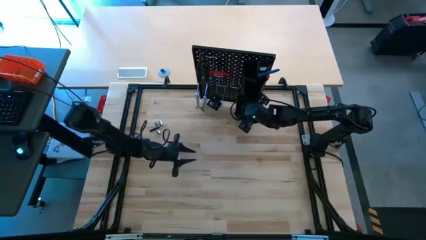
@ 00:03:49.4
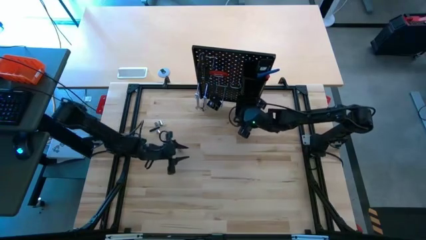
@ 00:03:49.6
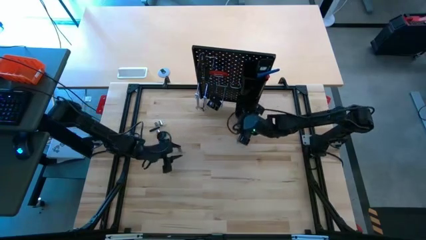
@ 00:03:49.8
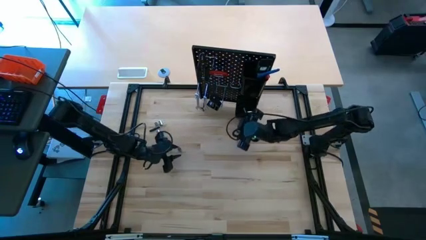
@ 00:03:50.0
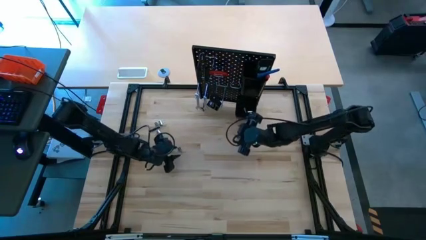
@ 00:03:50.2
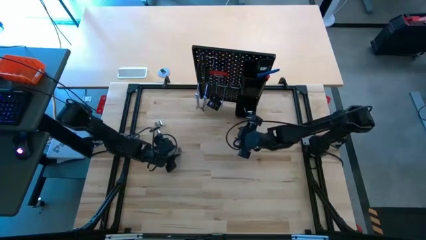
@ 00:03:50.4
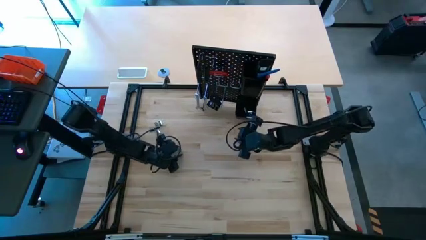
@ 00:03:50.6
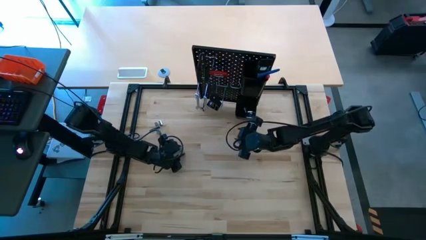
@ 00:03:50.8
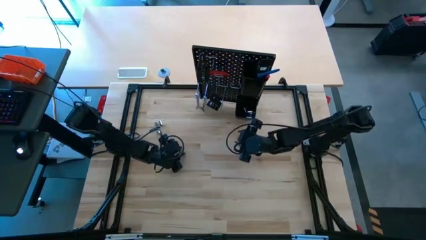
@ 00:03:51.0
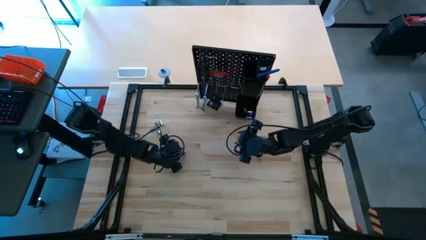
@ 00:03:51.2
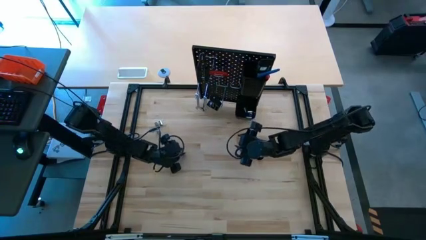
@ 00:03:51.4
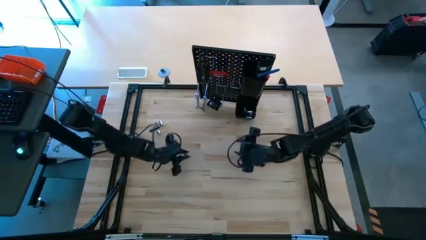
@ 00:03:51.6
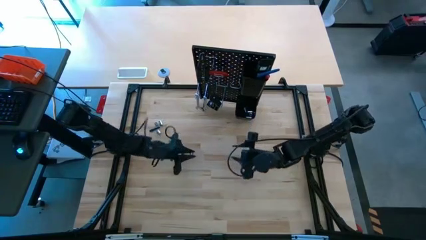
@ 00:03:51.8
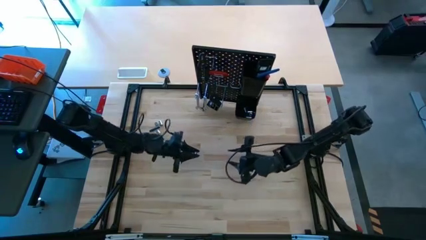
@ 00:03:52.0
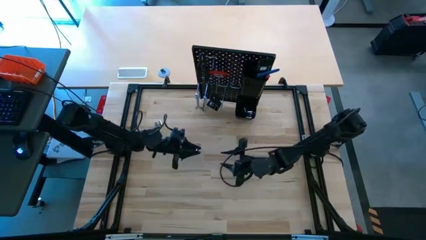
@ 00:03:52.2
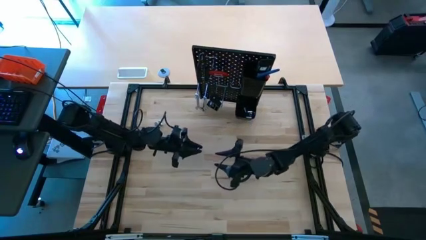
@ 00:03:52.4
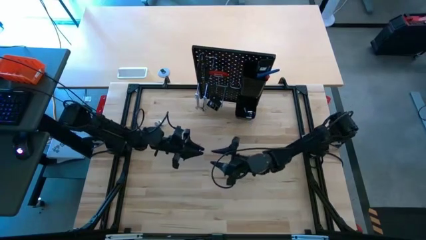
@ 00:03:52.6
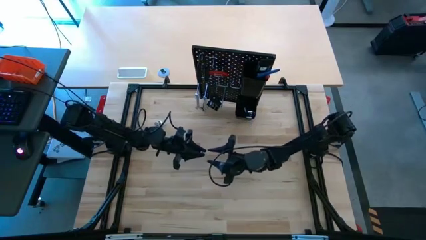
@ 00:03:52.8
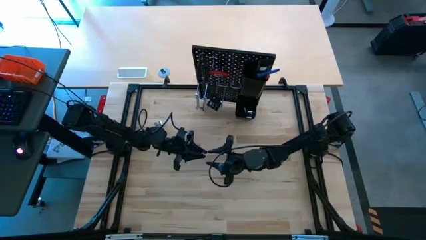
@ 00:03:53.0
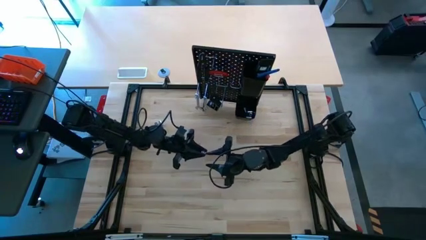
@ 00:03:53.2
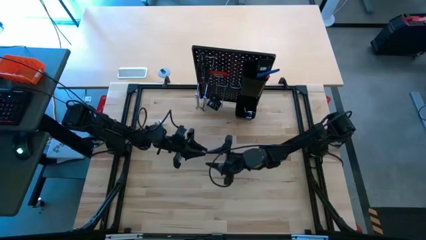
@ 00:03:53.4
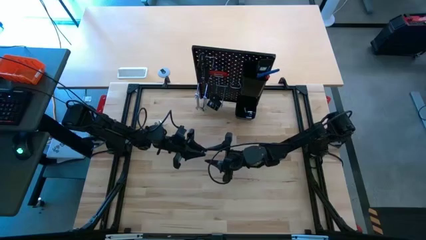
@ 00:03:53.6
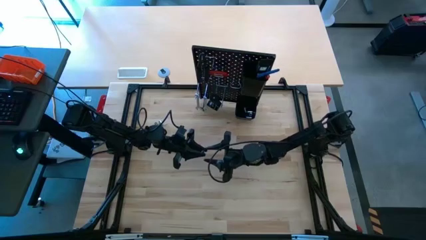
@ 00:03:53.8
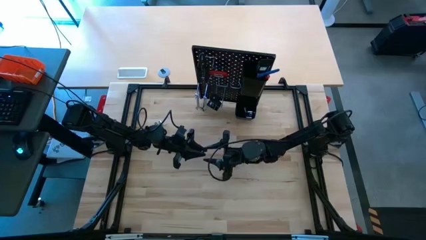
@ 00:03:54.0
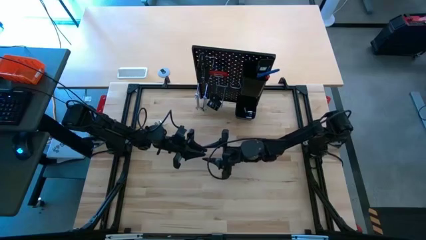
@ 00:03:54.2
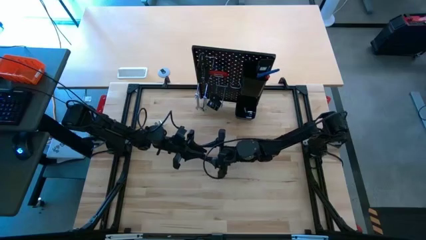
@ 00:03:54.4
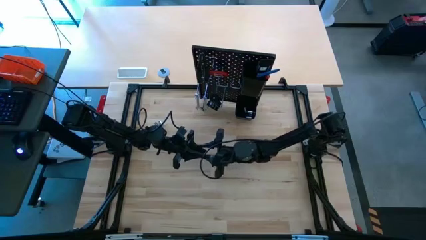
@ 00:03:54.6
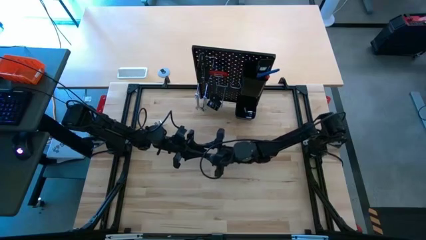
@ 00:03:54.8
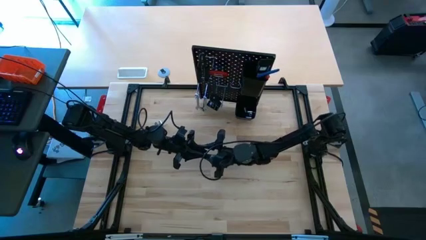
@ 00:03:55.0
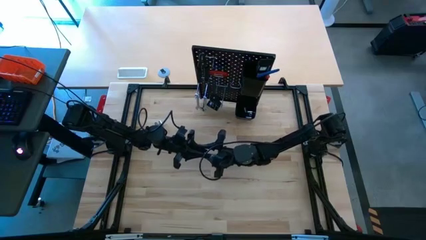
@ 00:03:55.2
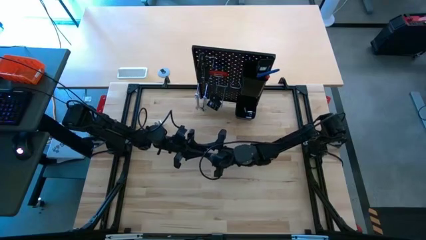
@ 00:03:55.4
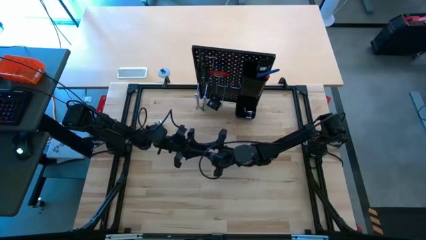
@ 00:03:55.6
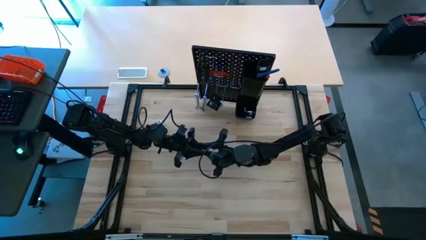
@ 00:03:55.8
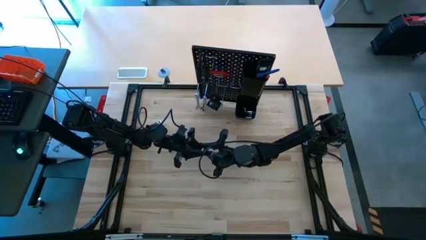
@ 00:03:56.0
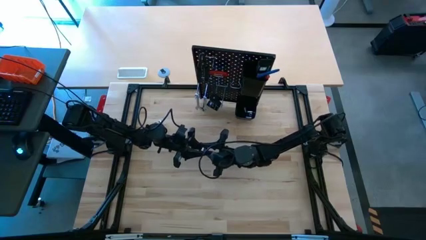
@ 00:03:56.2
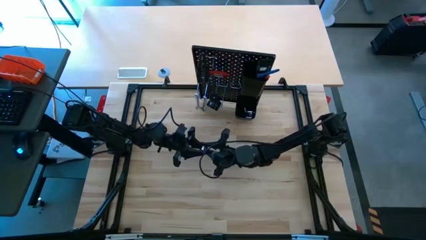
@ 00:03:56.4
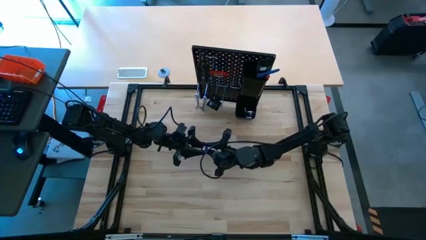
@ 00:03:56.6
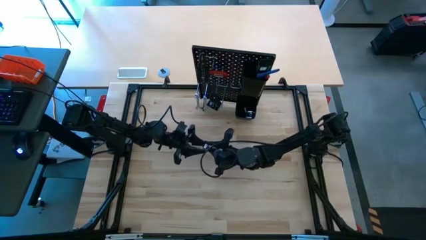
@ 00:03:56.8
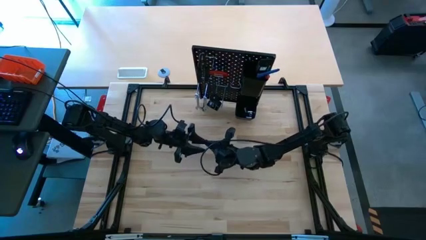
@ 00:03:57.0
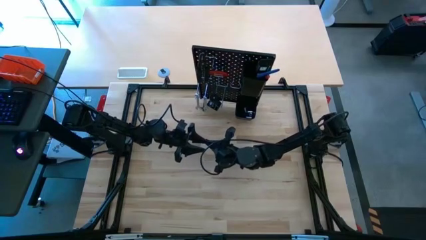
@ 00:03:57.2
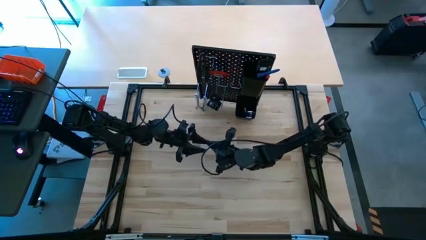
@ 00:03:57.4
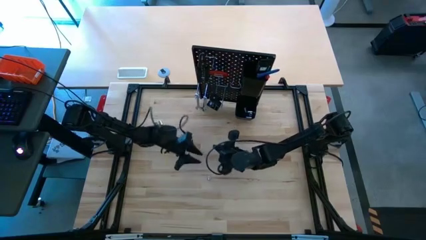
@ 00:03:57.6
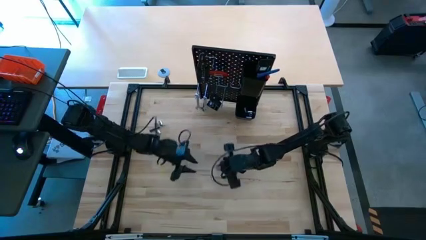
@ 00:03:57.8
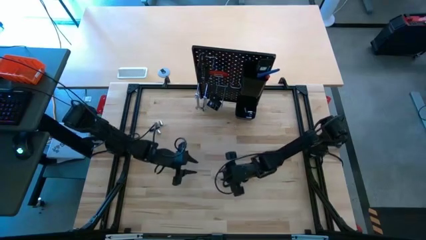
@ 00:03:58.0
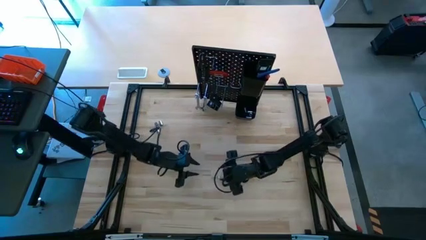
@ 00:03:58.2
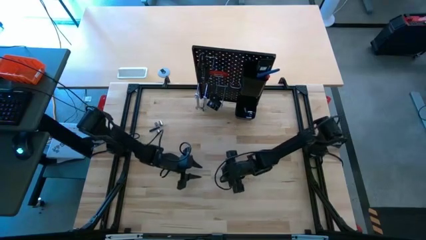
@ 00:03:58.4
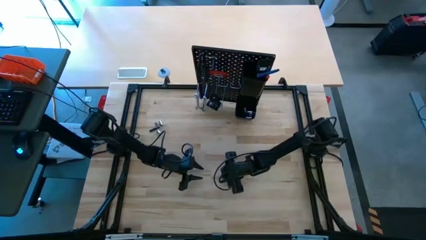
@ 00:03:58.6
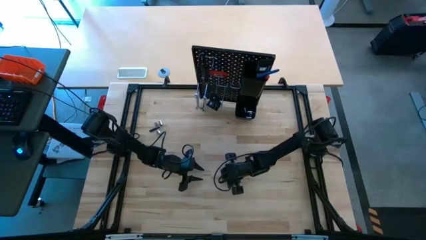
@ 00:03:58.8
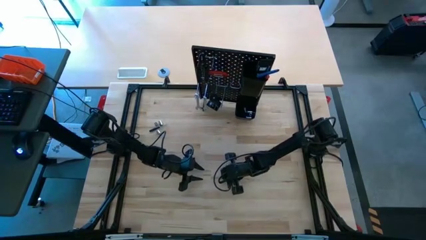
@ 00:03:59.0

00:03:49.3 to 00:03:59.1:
Task: Hang tools onto peg board
Put the socket into the bottom black bin on the peg board

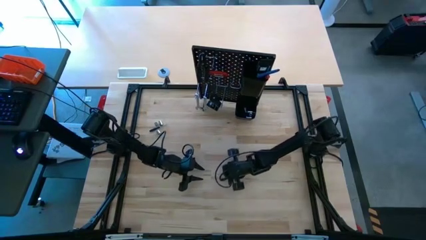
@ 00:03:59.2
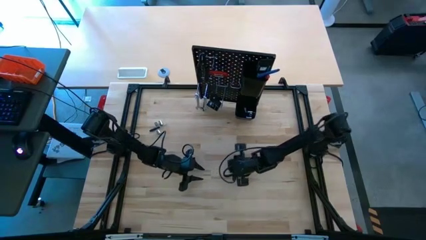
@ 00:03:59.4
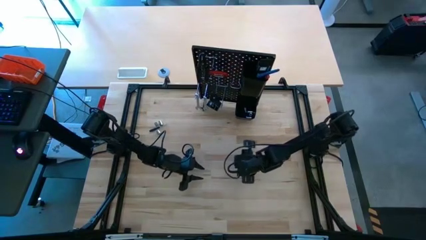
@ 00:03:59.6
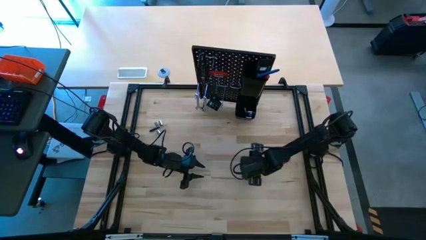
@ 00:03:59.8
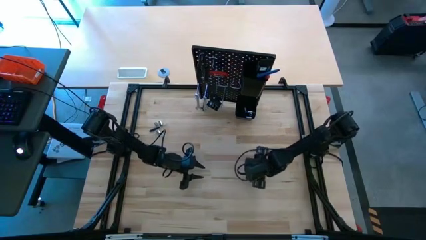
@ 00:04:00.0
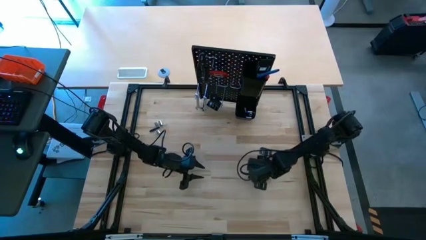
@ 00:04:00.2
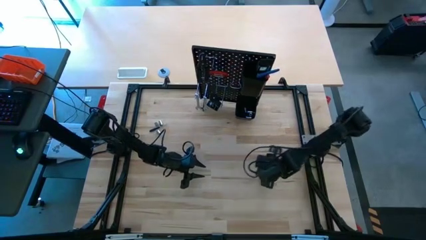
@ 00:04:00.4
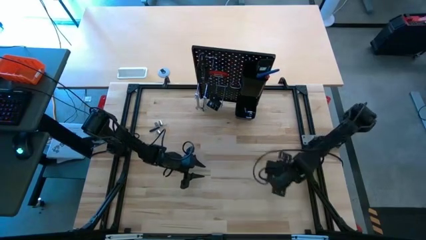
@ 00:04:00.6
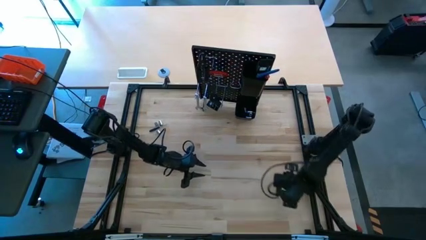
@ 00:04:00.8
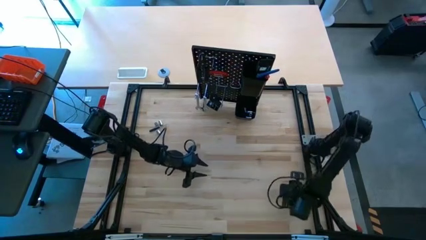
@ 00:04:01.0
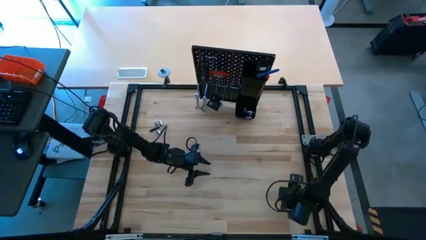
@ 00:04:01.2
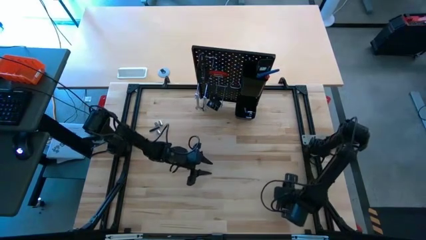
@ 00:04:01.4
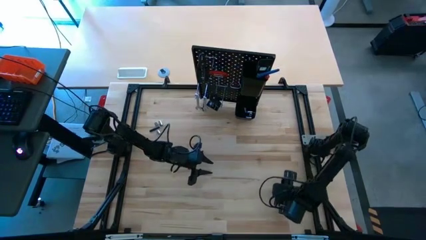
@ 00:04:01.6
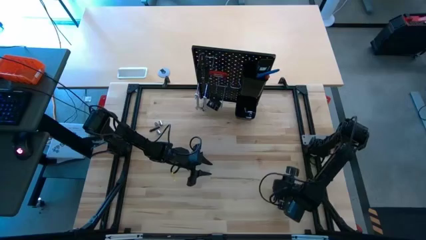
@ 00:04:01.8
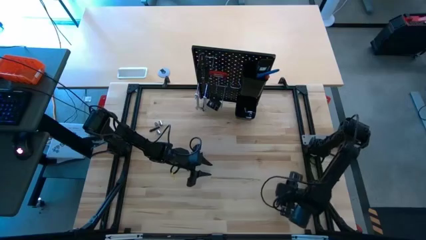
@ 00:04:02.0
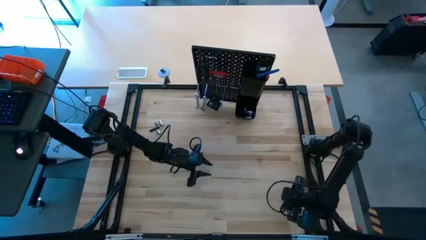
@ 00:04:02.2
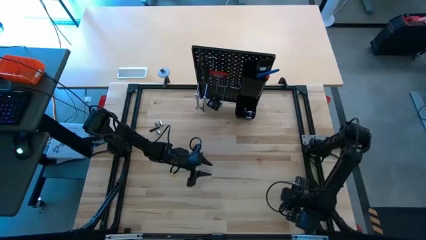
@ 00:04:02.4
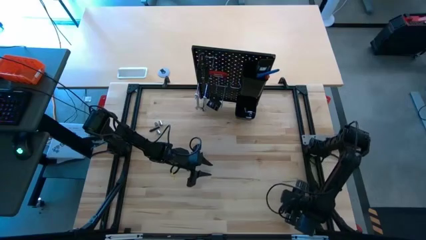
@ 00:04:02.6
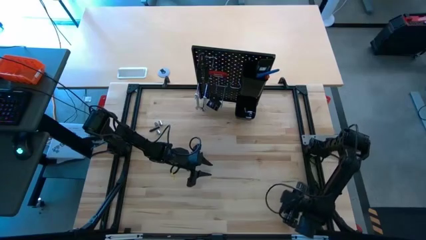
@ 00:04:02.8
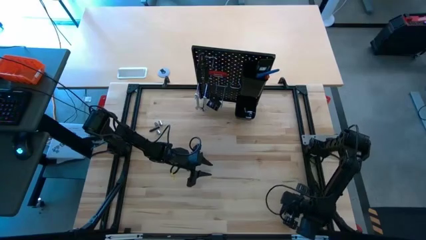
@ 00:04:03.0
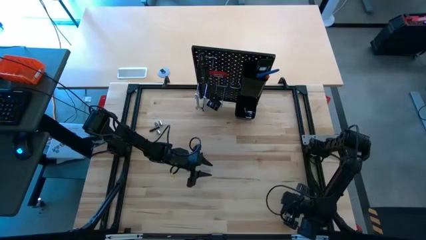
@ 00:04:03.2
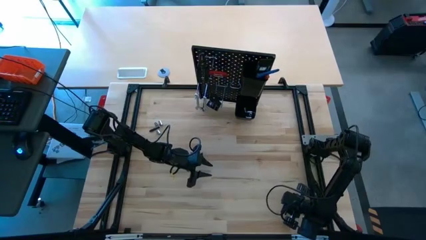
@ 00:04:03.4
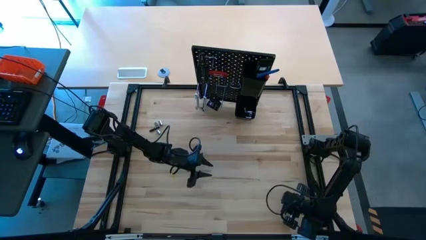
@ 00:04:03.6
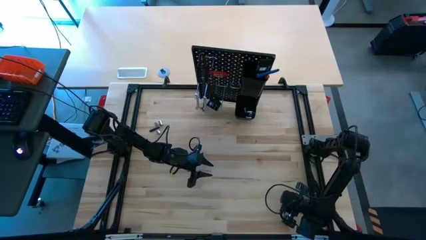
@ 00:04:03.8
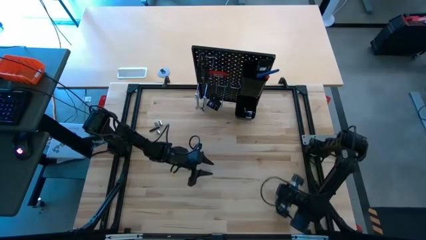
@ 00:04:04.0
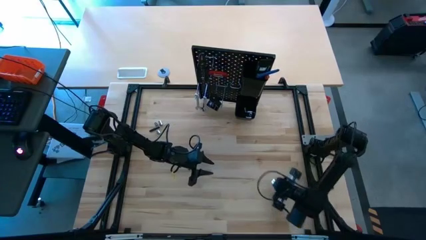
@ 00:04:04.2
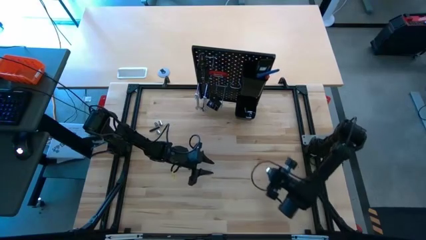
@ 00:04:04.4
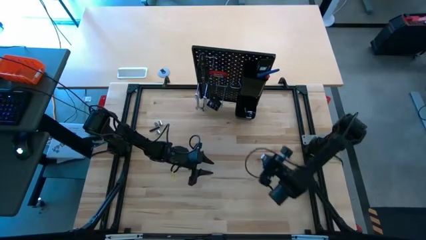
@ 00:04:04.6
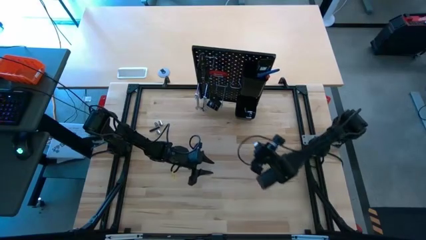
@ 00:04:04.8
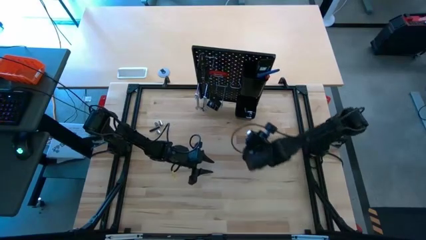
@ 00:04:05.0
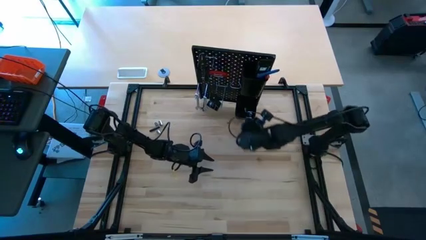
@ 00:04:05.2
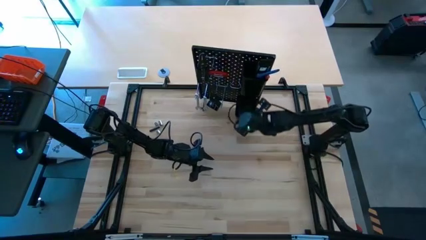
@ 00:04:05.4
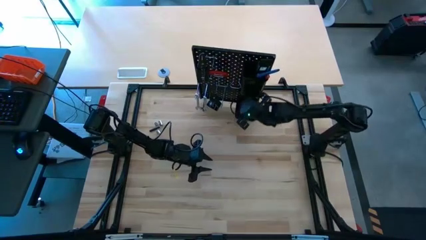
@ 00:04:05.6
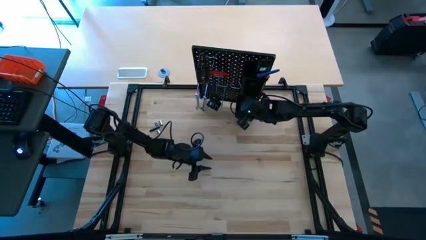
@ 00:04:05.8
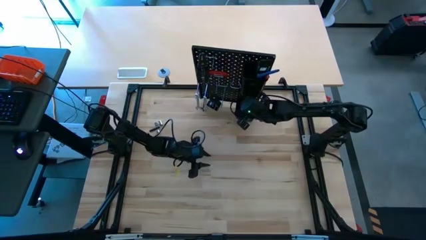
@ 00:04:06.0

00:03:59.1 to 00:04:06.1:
Put the socket into the bottom black bin on the peg board
